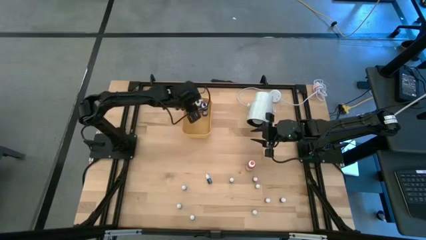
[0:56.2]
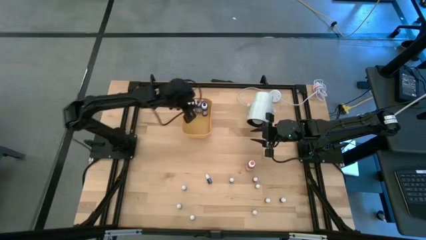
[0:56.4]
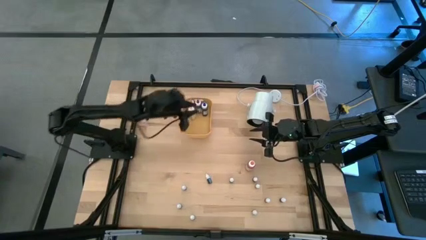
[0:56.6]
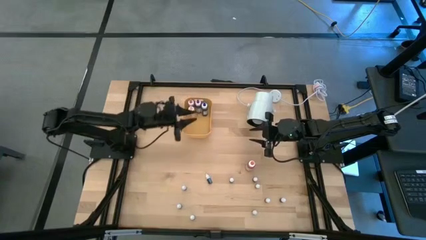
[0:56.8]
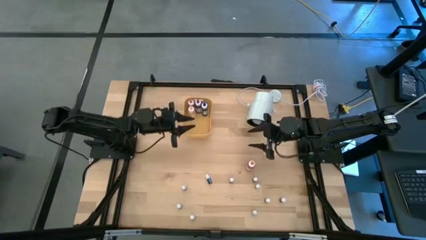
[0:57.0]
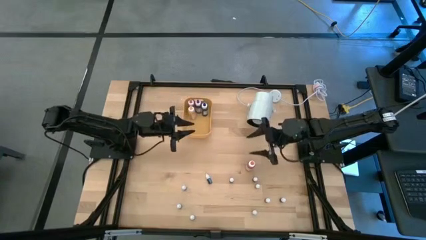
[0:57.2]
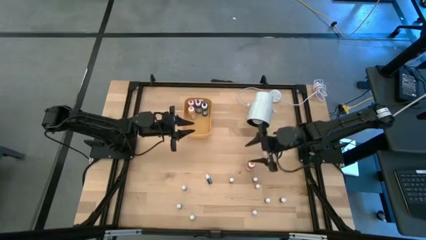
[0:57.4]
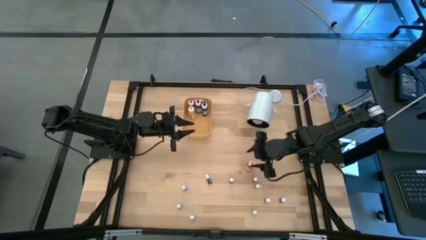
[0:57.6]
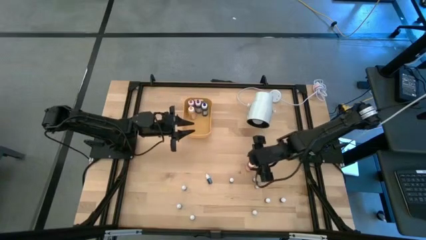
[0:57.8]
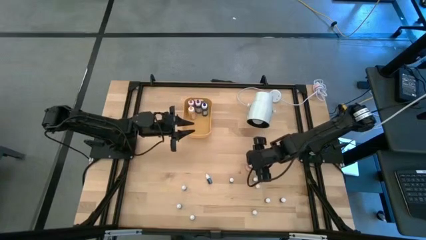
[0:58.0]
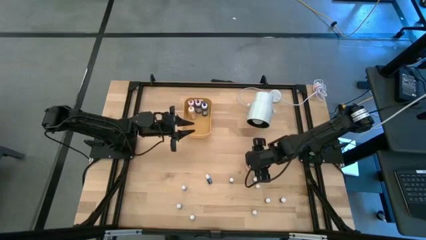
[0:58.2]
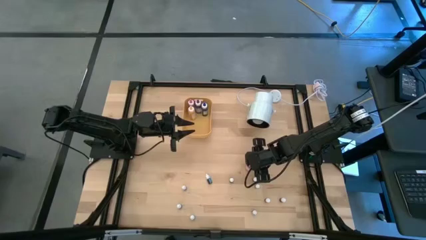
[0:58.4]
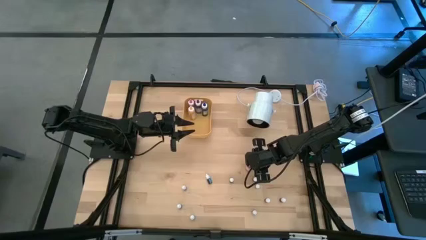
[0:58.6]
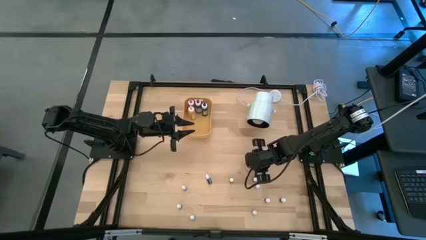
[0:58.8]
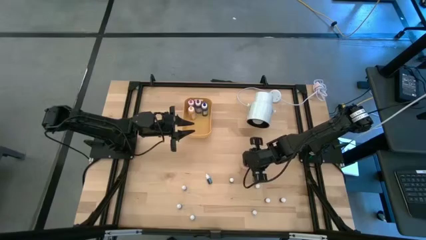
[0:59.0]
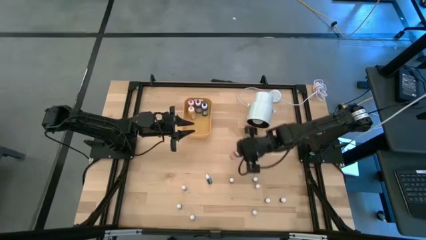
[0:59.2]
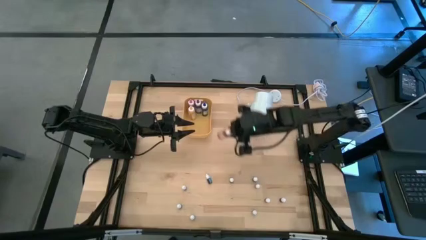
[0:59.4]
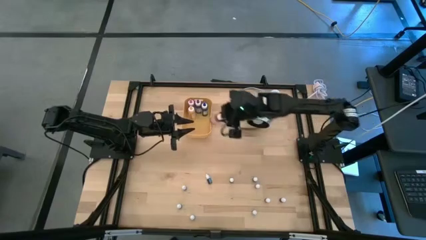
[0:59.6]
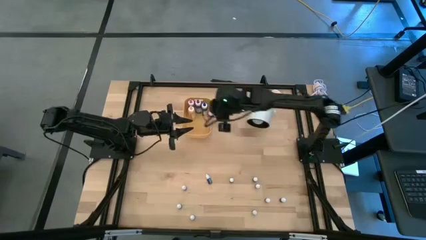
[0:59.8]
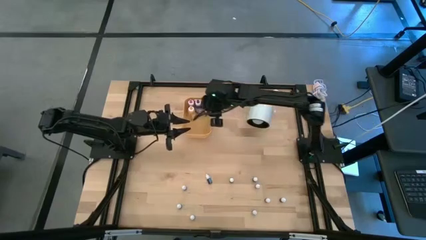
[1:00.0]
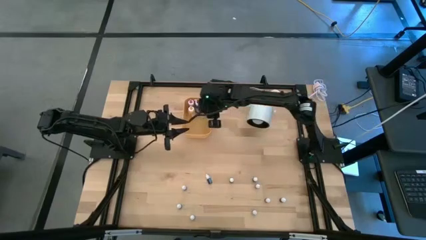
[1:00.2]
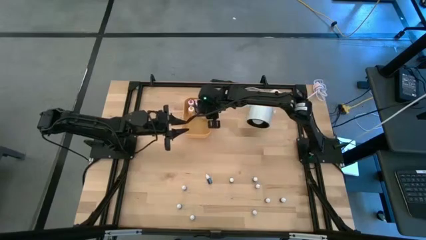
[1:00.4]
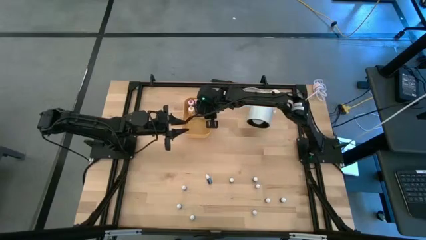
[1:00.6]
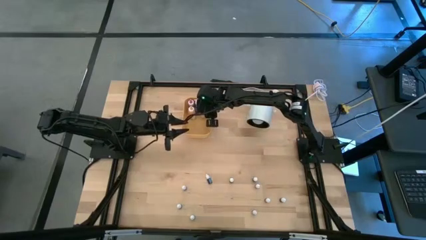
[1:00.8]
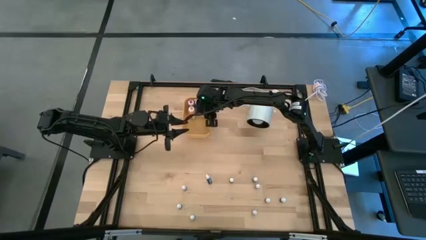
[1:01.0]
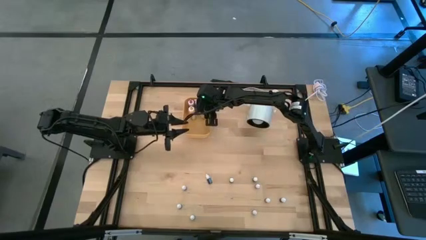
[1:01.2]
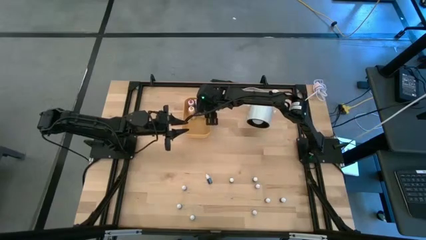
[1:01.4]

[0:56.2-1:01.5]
Task: Pick & Place food coloring
Put the large orange food coloring bottle into the yellow bin

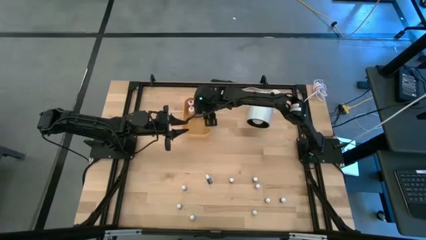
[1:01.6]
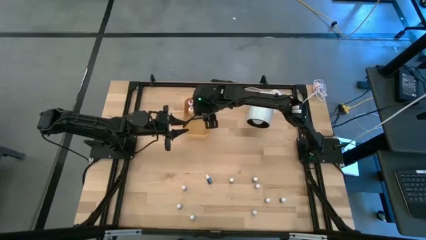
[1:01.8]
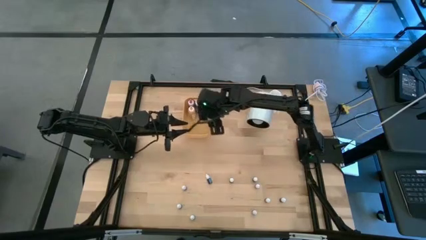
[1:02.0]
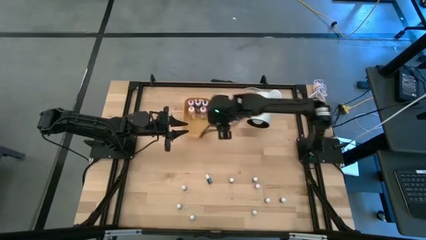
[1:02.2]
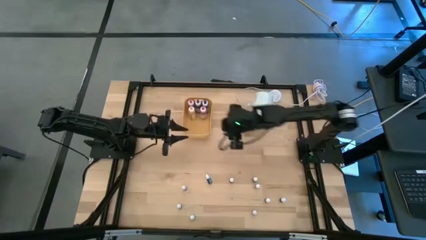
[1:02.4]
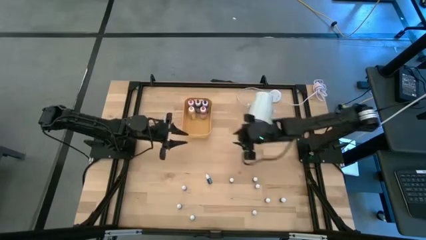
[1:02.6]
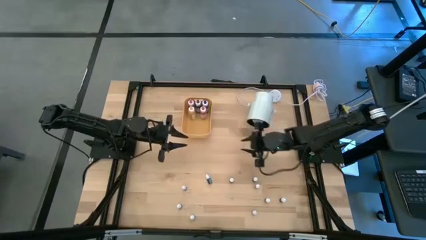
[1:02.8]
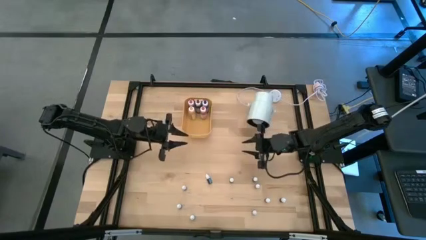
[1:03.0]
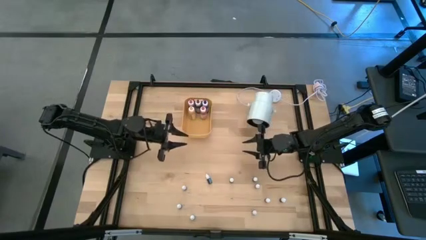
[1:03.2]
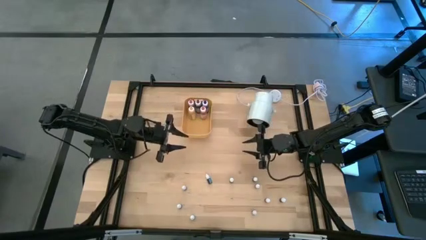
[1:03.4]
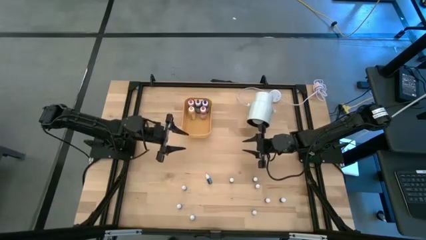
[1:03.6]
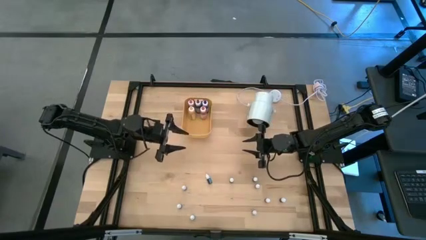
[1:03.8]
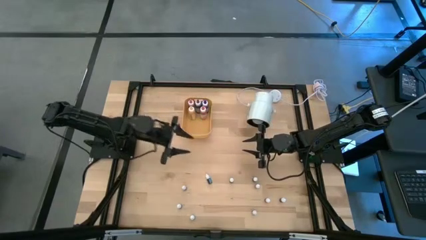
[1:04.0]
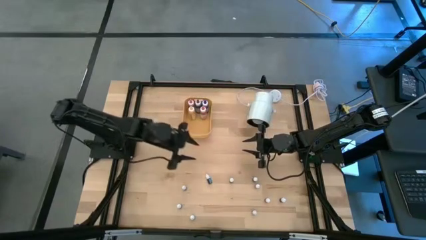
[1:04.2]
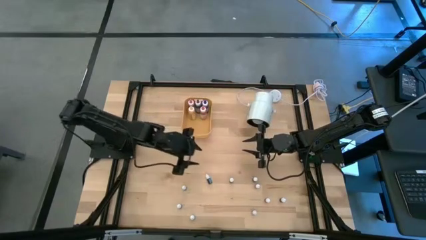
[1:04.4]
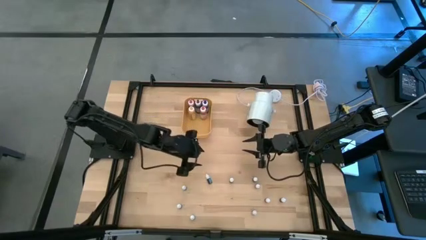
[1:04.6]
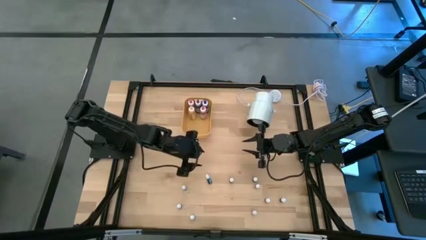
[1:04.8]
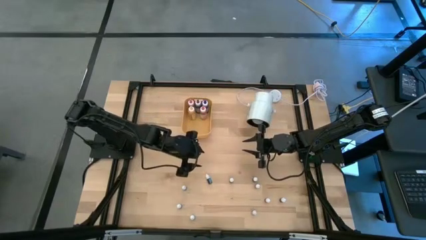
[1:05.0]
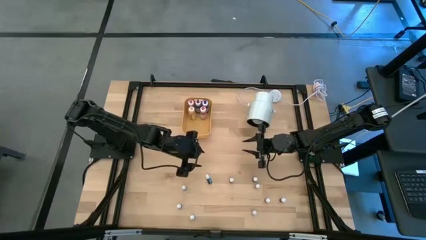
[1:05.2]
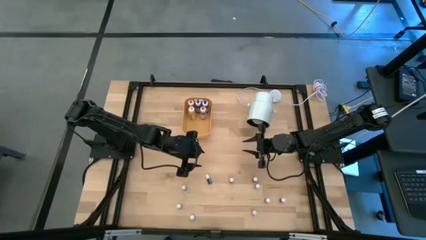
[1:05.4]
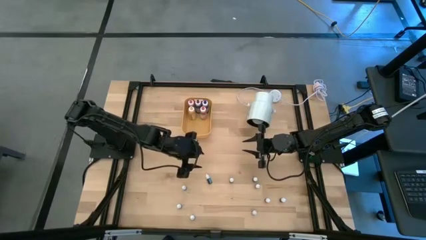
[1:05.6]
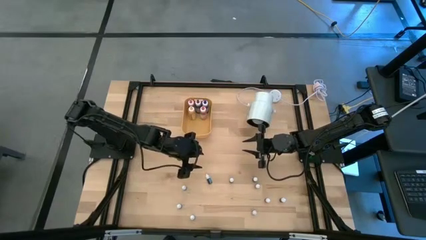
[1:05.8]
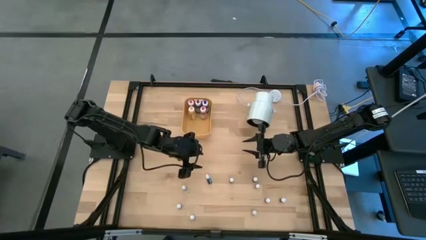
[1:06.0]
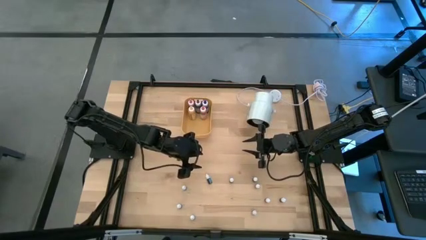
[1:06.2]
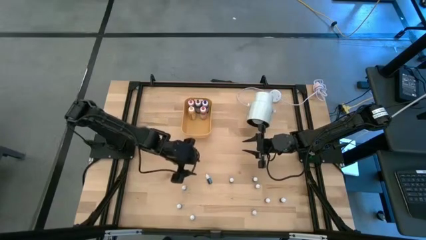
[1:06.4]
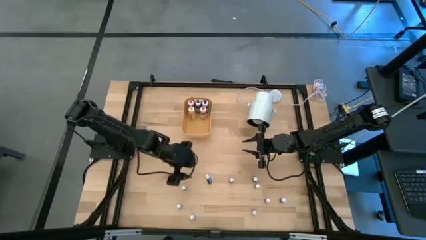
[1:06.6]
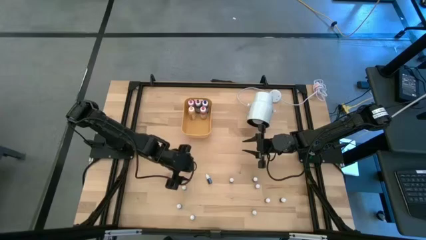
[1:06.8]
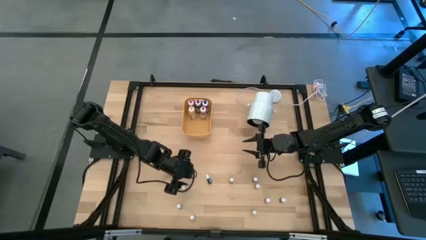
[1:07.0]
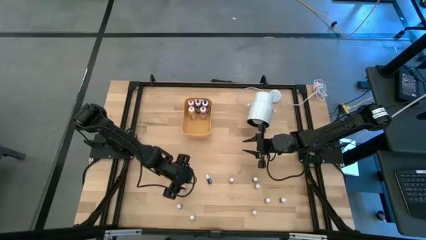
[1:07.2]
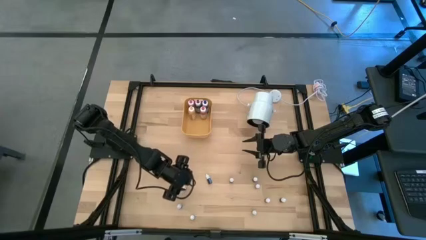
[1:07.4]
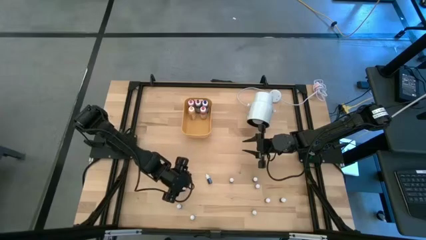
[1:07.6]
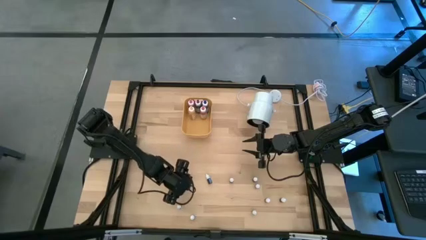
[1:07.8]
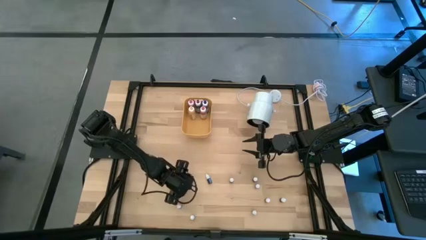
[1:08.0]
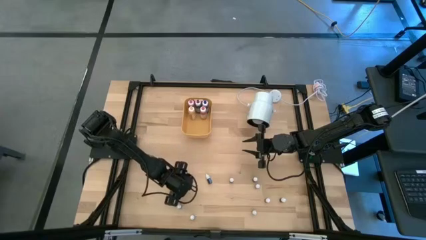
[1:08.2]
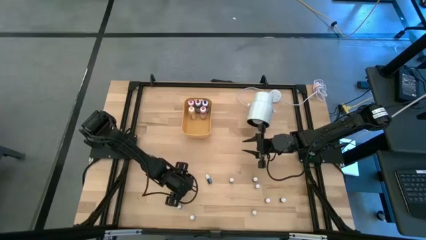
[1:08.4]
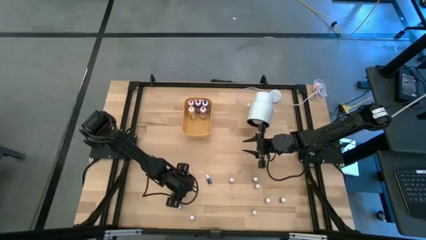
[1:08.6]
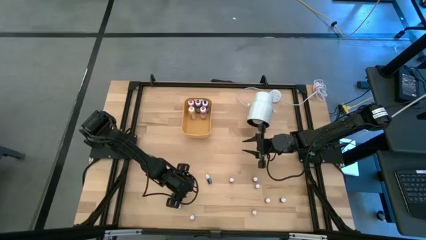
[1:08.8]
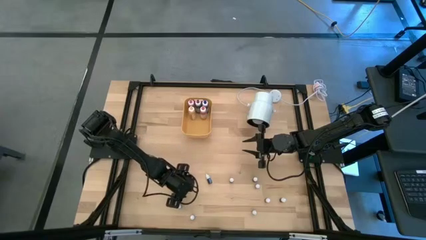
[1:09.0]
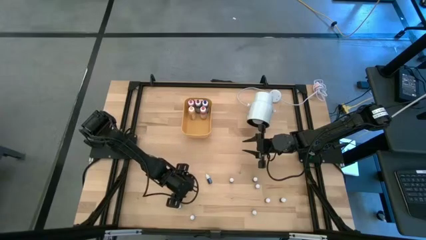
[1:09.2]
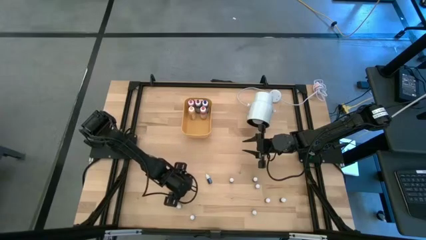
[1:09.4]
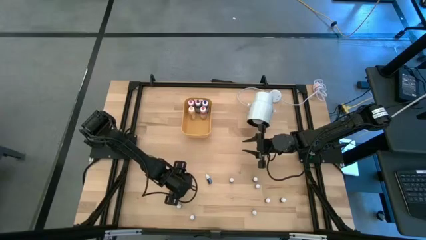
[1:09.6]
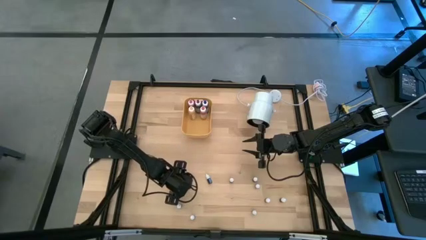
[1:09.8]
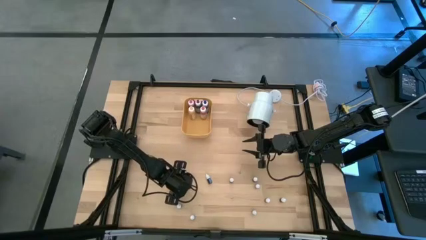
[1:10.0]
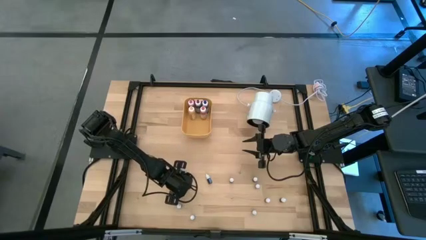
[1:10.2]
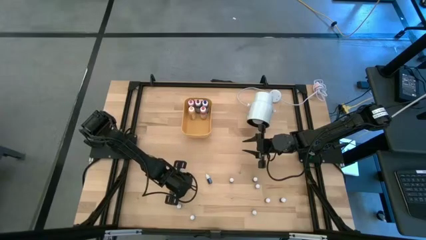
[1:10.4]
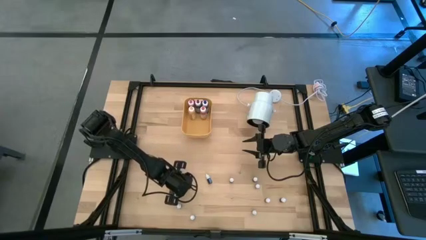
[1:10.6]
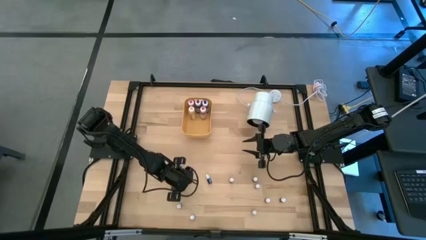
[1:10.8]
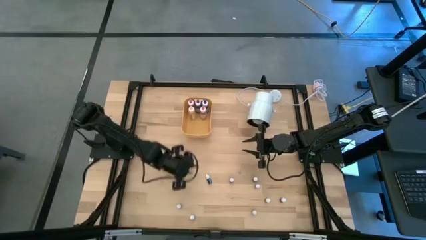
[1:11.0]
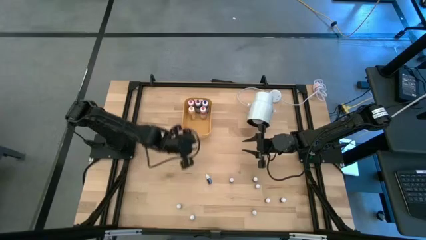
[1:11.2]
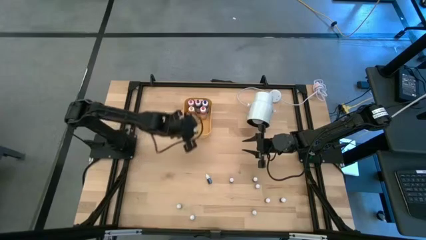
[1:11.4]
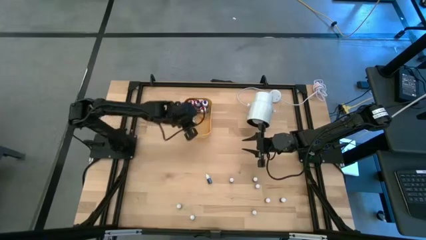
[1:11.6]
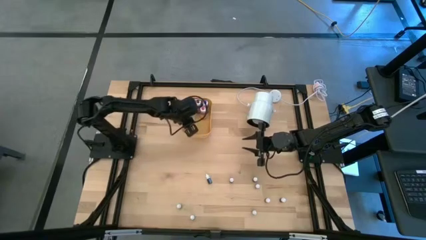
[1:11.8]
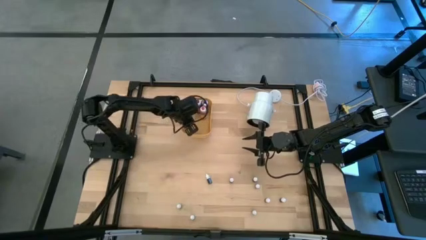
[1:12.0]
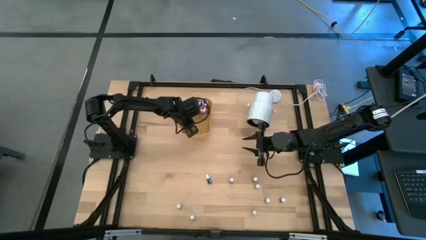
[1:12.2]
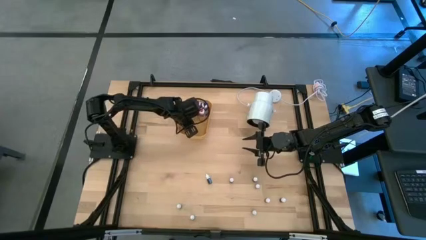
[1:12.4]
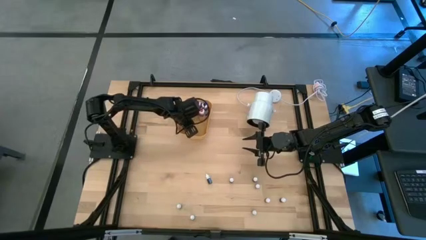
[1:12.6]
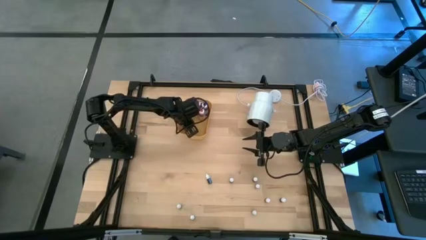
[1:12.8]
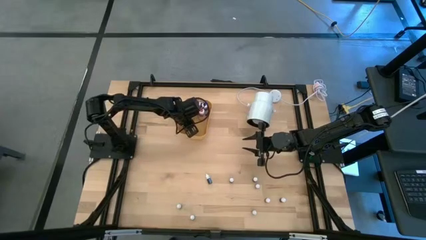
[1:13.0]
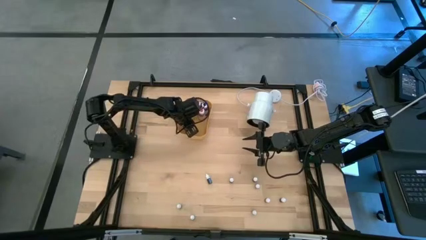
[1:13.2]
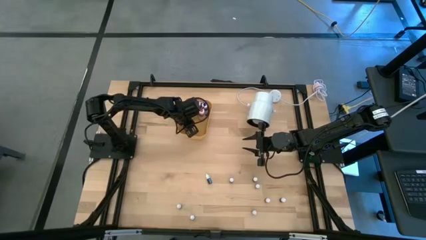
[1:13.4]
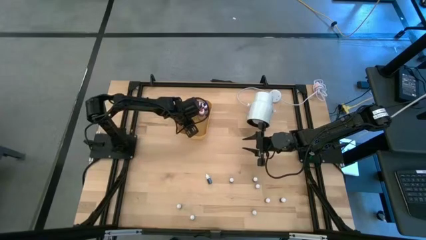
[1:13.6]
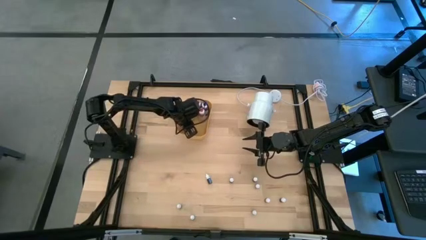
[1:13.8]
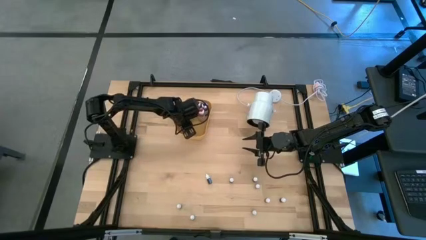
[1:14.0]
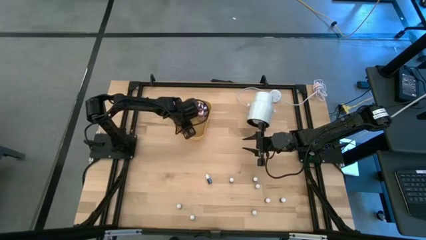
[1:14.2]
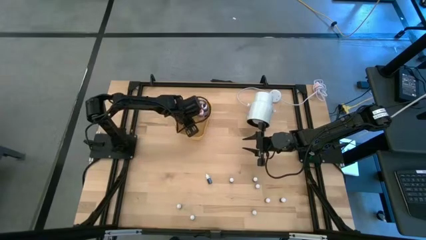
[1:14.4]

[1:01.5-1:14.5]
Put the left small blue food coloring bottle into the yellow bin
